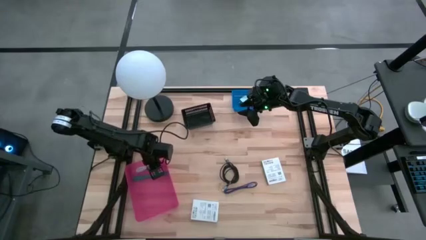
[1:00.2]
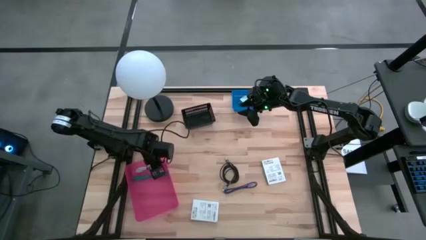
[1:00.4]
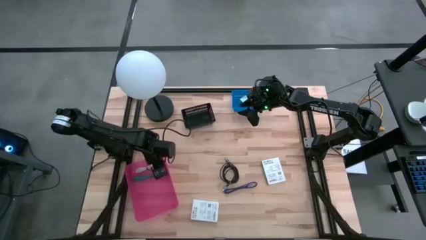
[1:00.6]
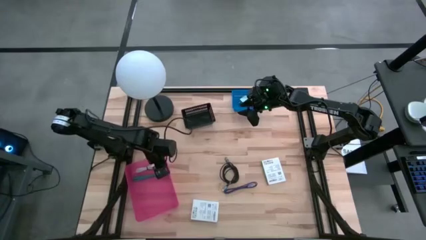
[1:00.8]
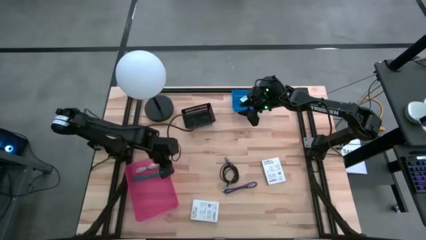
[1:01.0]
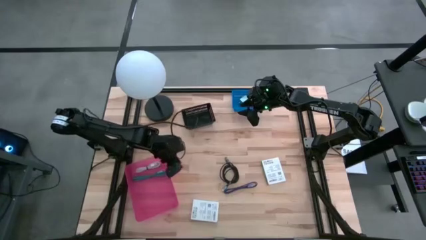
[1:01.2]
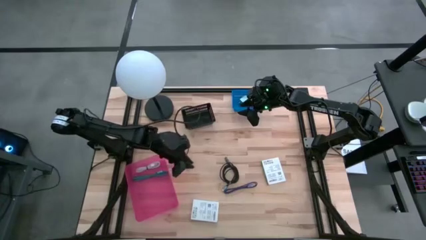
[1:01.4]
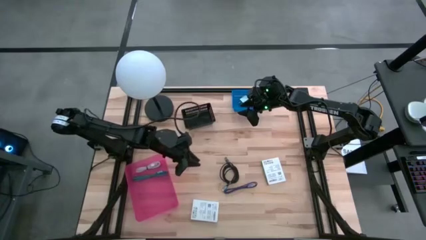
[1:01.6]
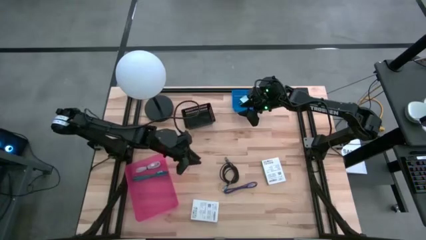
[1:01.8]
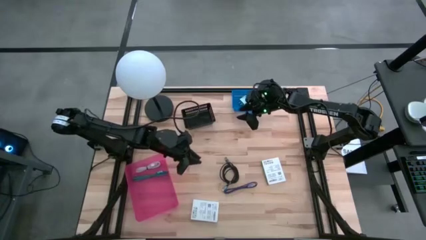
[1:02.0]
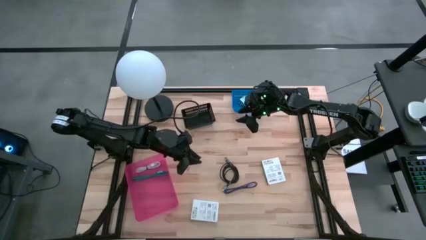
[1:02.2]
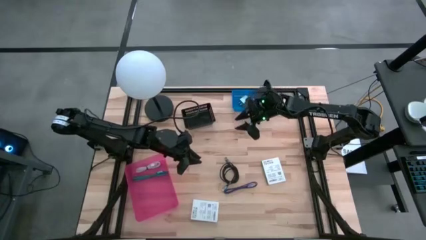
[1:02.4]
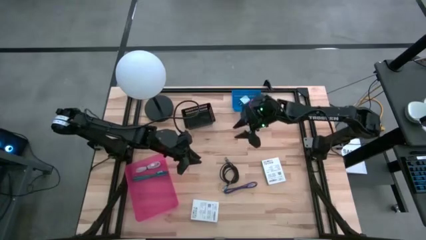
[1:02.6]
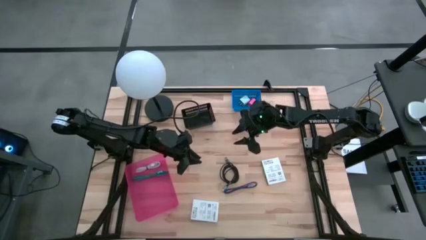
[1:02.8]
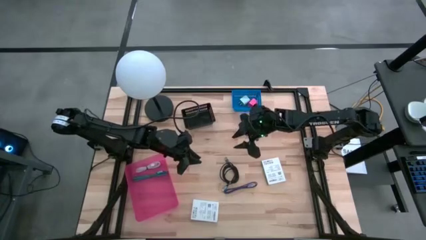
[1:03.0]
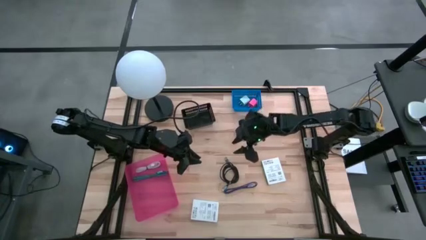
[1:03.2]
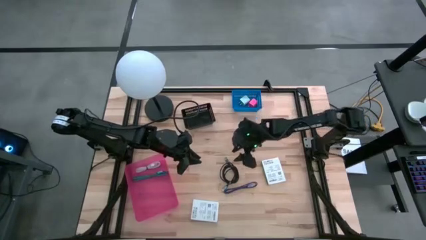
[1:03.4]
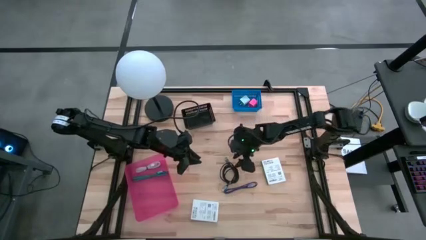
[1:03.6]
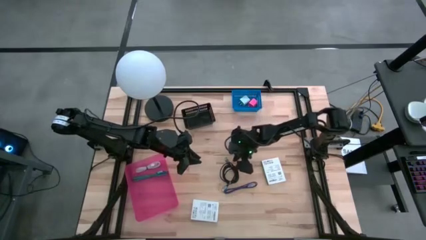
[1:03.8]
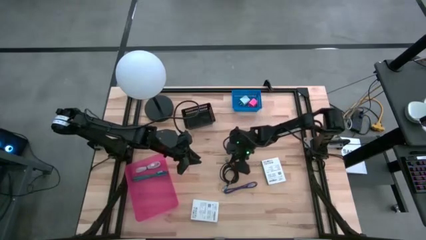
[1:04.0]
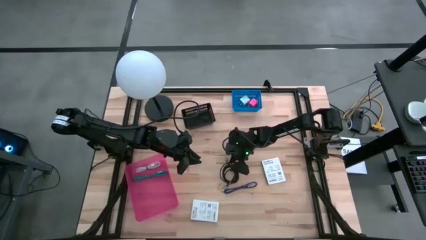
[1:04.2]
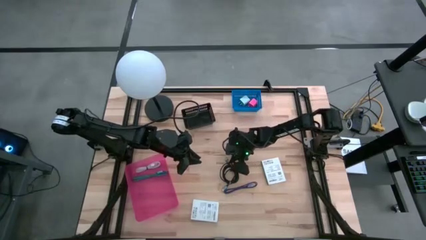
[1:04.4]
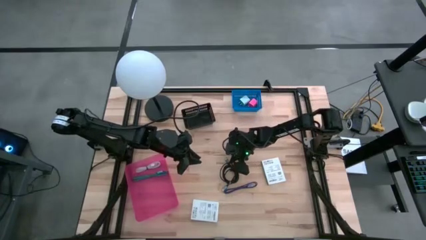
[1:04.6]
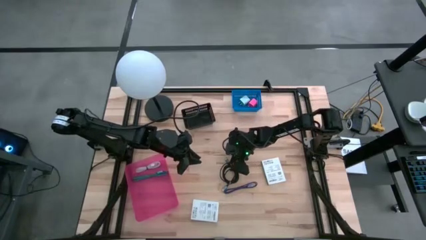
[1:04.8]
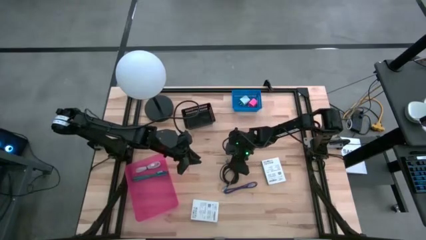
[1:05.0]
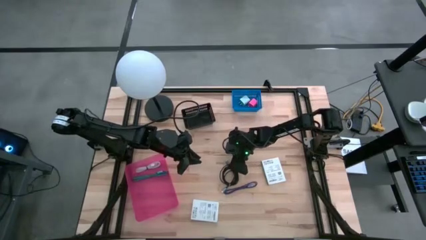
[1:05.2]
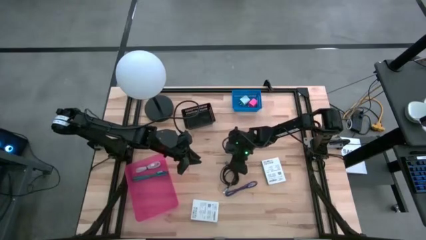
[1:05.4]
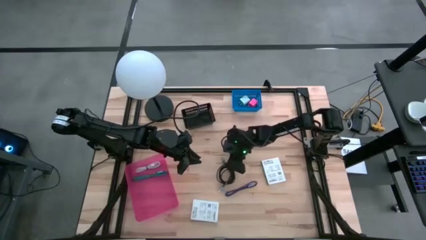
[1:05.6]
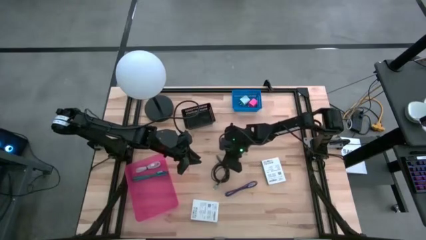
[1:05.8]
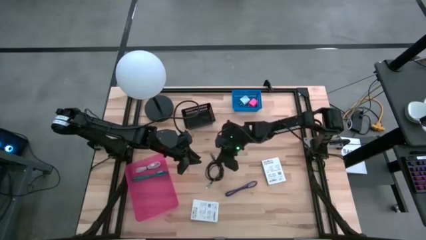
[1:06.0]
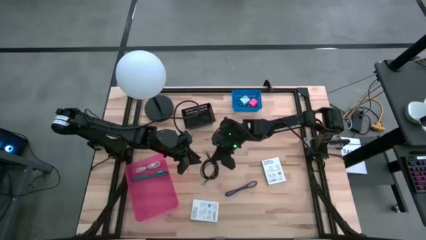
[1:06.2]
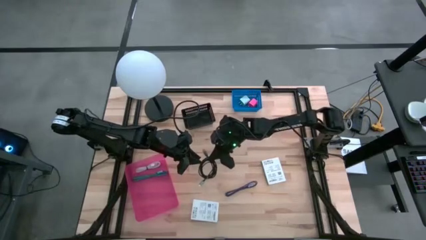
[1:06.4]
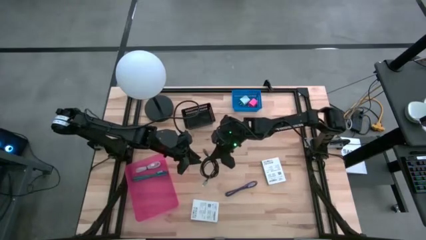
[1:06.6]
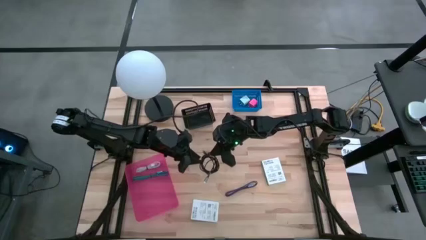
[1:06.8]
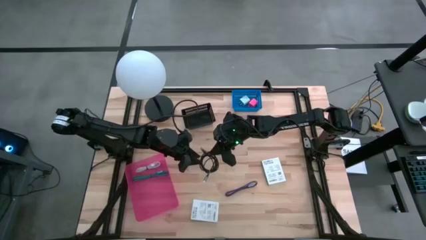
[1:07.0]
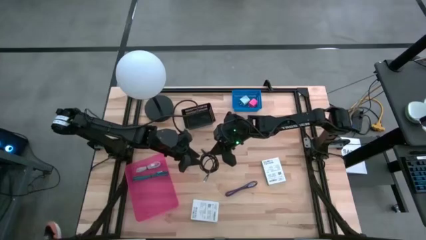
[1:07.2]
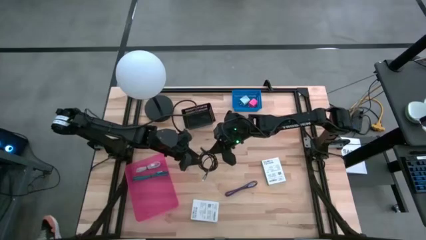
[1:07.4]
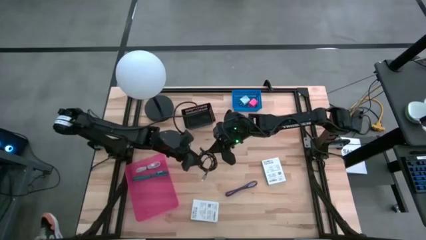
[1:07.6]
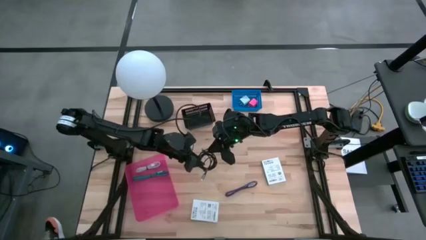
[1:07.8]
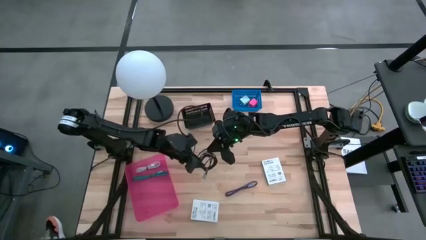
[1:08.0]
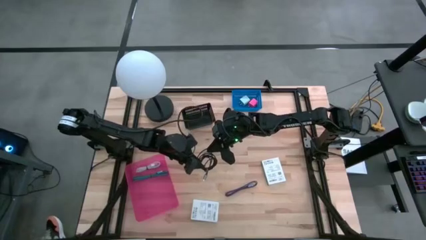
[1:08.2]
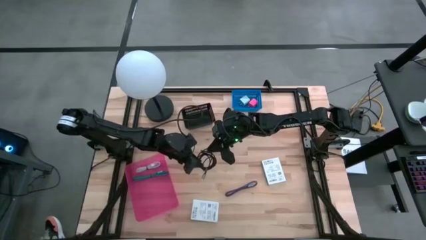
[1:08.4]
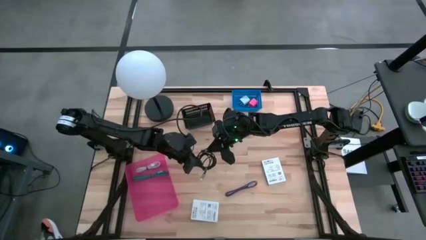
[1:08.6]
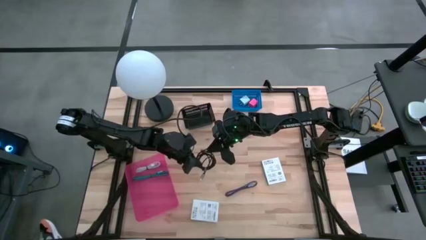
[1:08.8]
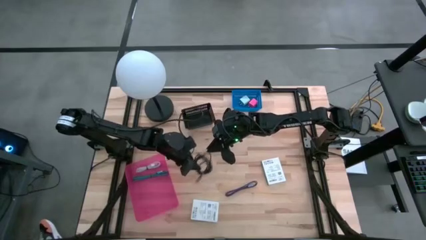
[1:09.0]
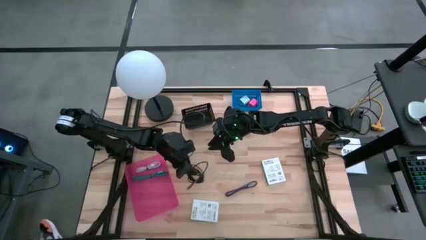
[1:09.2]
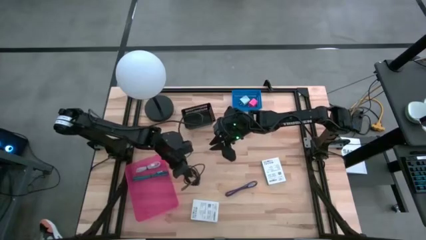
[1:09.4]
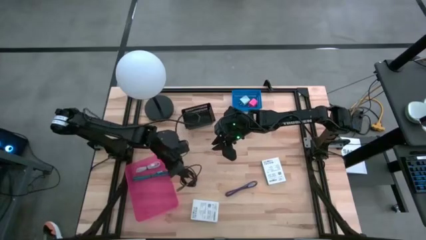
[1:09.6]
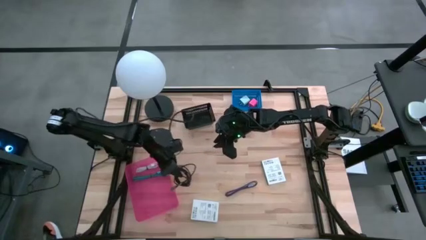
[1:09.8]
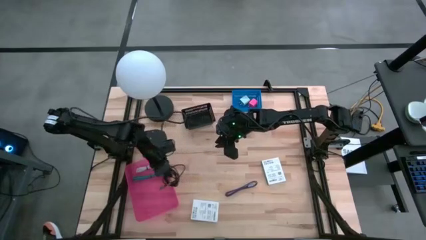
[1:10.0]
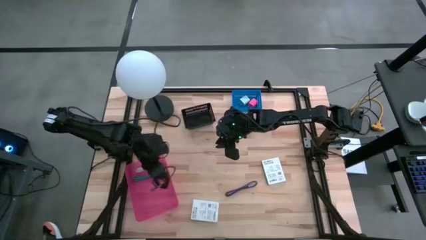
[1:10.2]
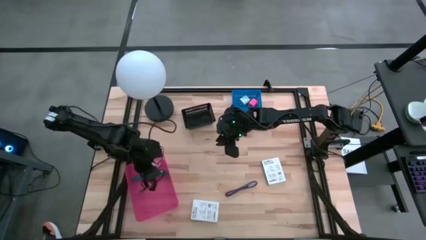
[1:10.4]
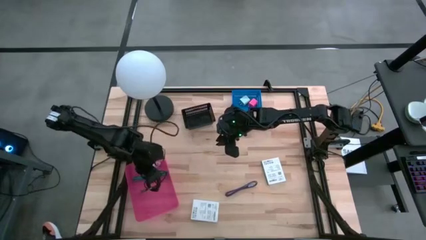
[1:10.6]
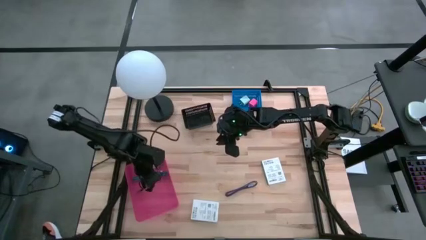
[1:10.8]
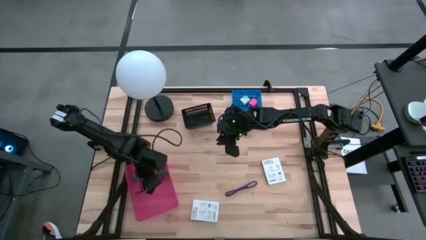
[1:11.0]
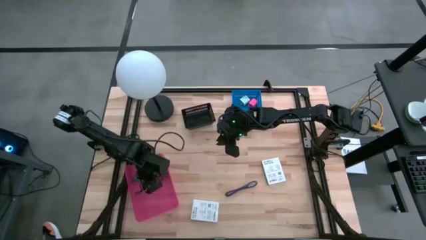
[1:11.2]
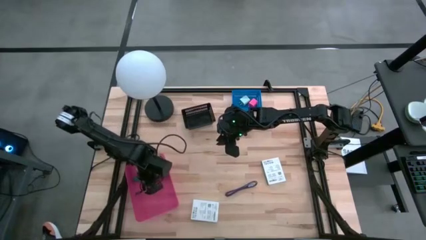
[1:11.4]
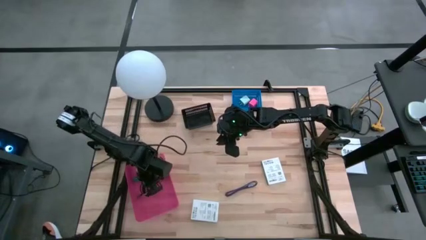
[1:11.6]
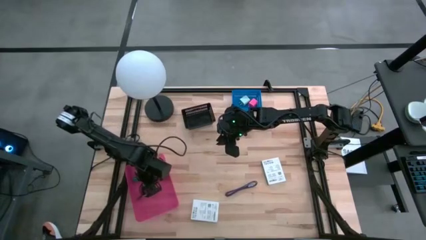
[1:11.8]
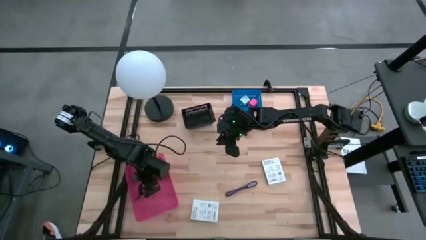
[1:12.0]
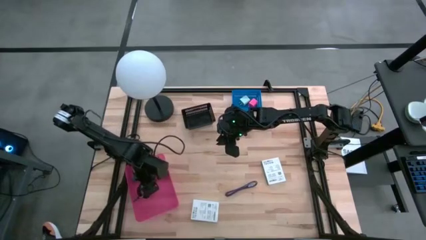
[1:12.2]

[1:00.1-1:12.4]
Task: Pick and place items into bin
Put the black charger cable into the light pink bin
